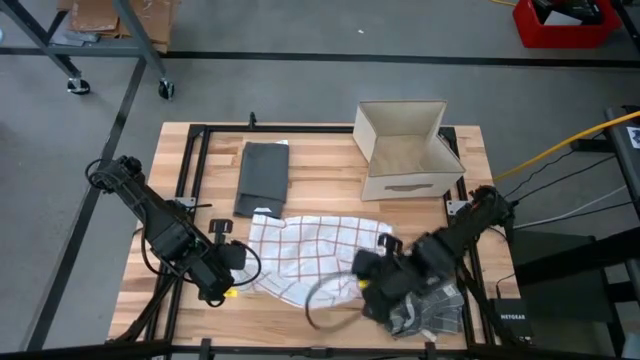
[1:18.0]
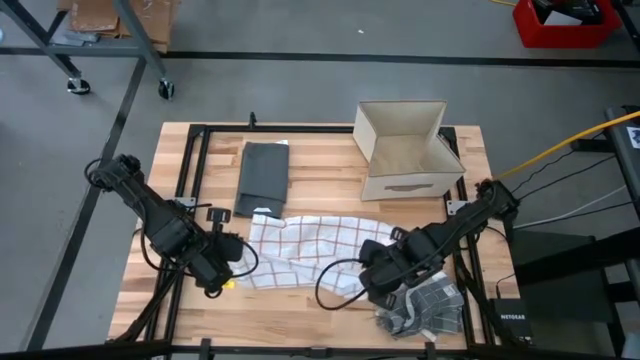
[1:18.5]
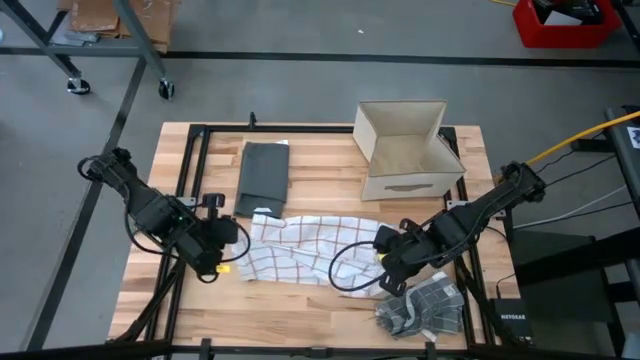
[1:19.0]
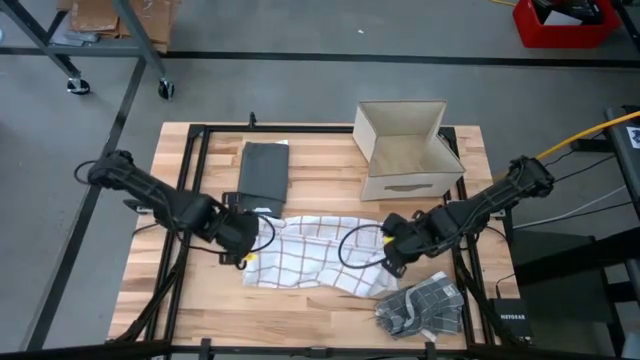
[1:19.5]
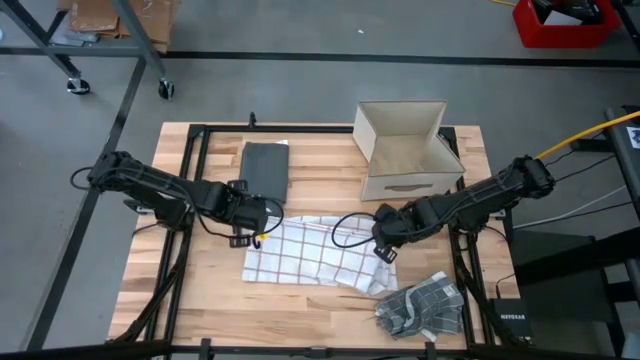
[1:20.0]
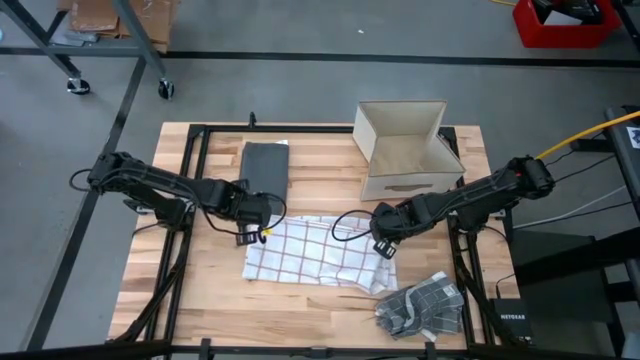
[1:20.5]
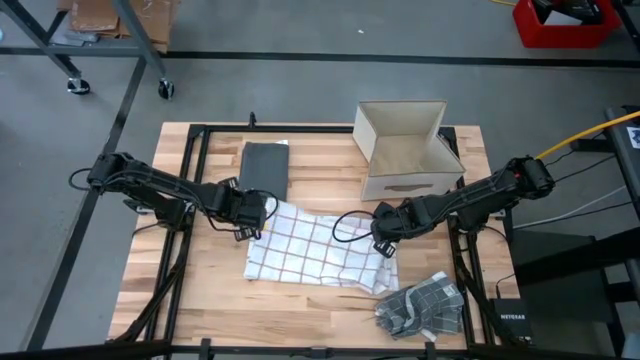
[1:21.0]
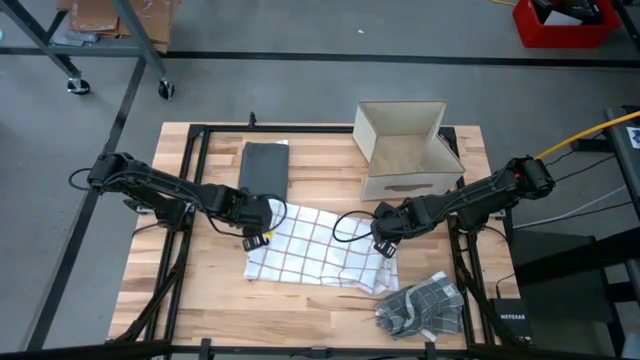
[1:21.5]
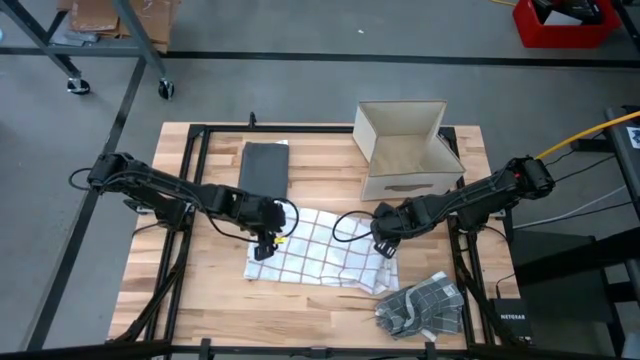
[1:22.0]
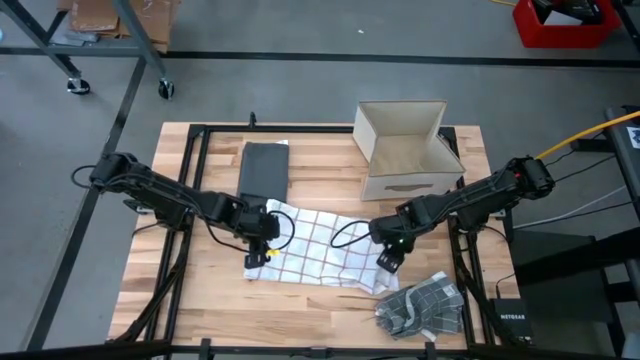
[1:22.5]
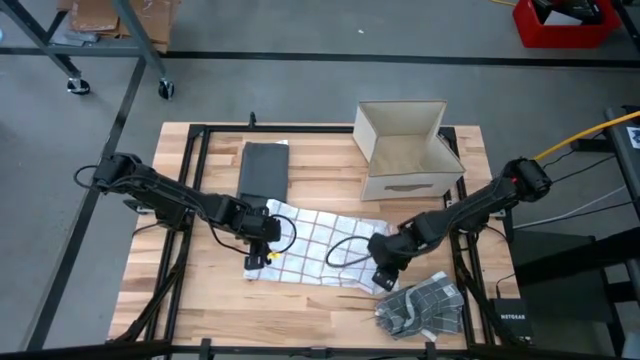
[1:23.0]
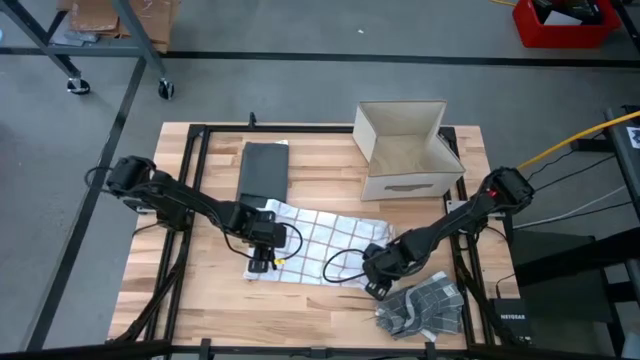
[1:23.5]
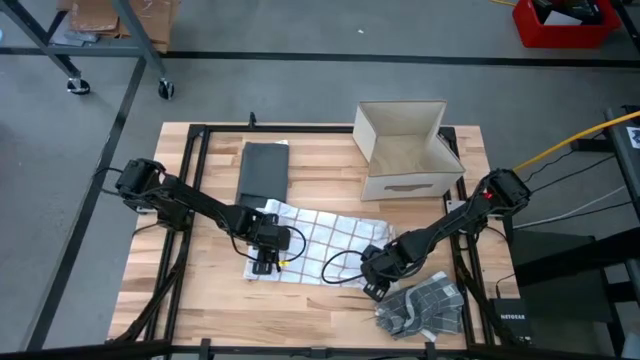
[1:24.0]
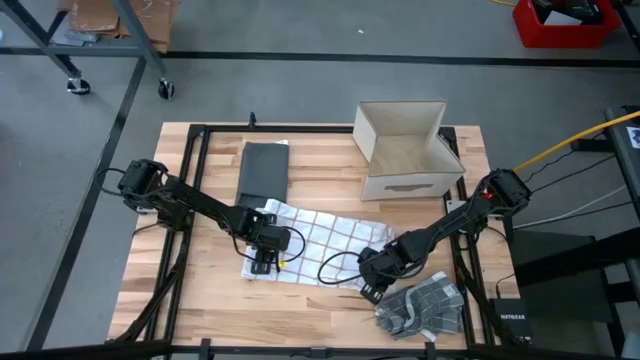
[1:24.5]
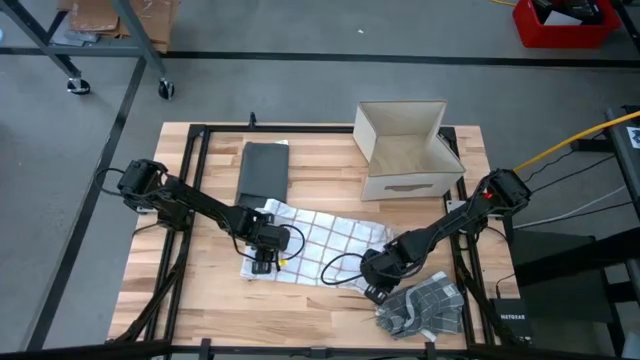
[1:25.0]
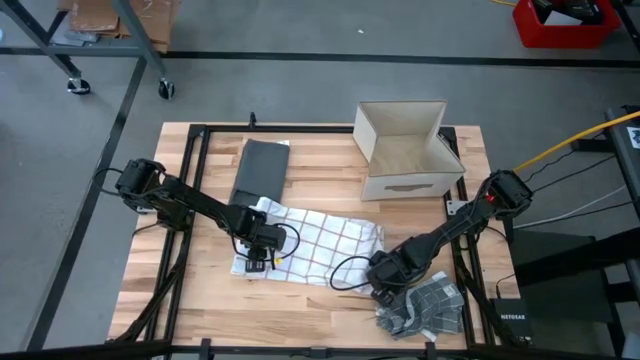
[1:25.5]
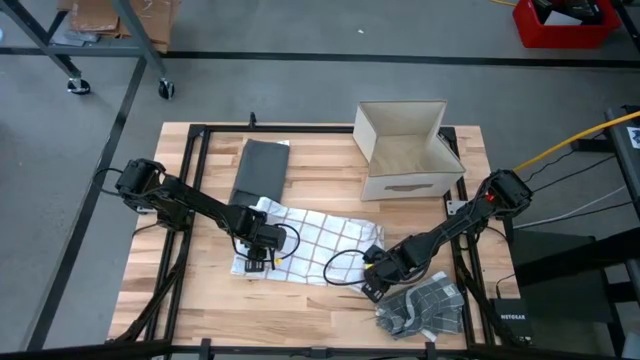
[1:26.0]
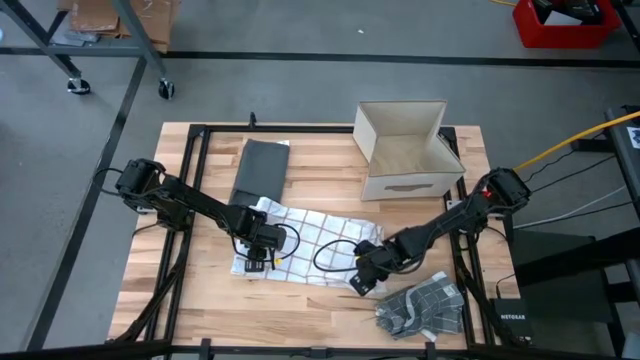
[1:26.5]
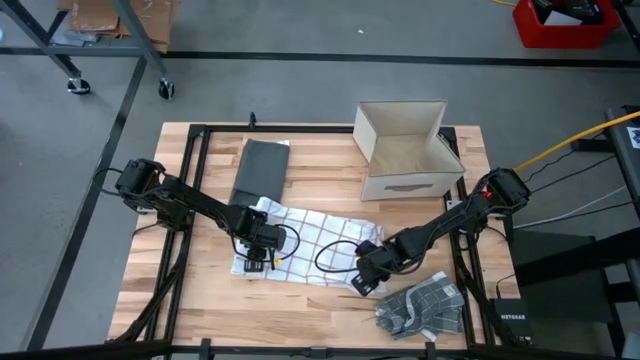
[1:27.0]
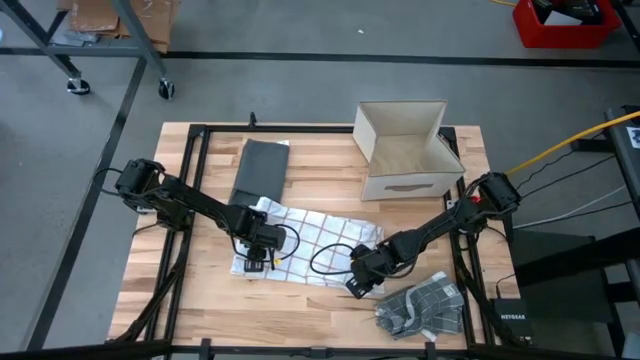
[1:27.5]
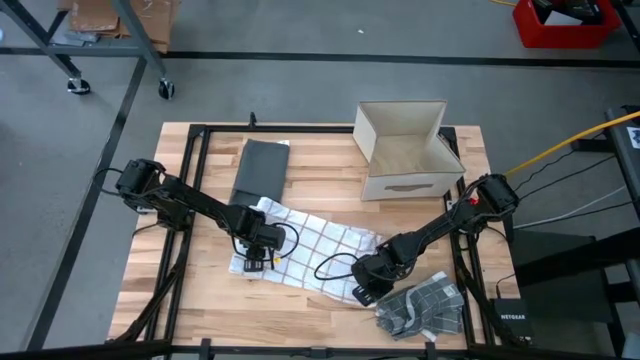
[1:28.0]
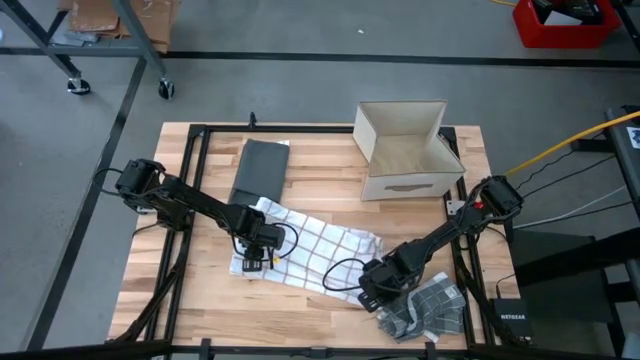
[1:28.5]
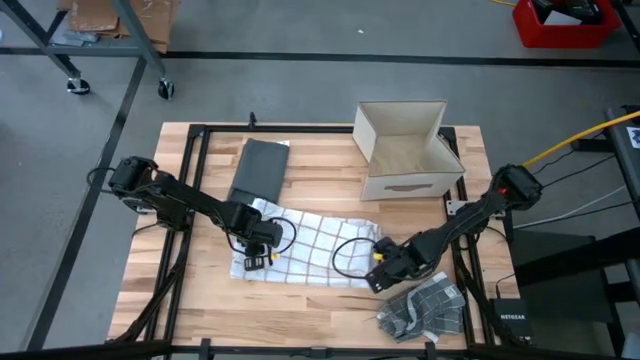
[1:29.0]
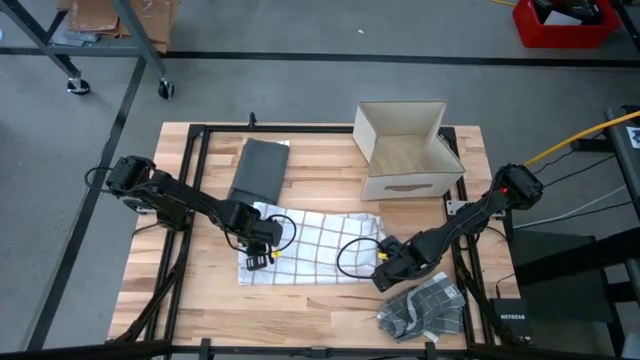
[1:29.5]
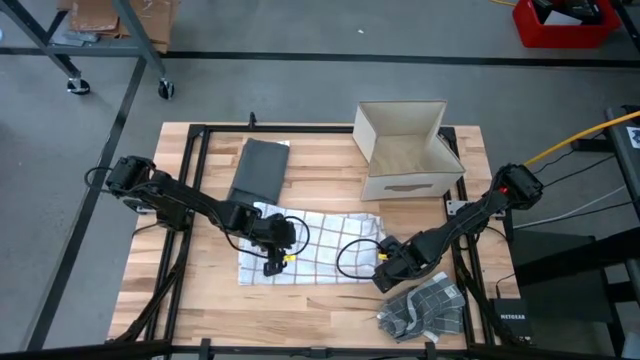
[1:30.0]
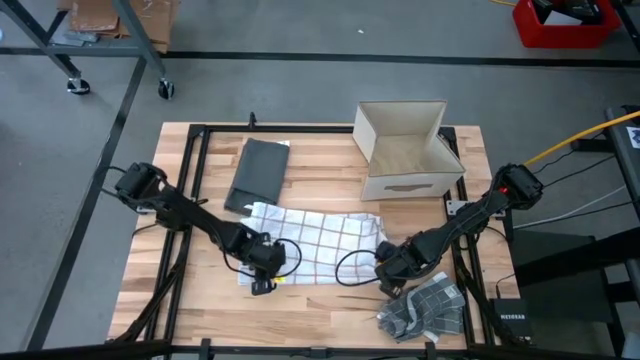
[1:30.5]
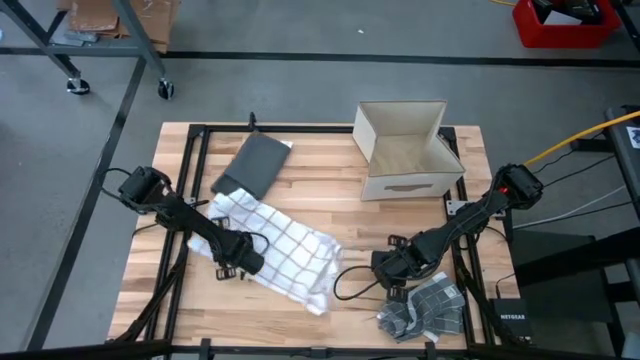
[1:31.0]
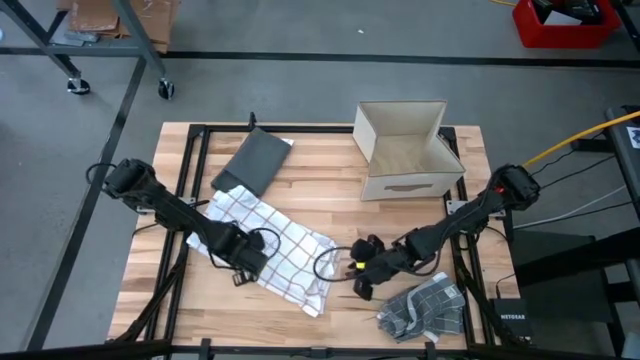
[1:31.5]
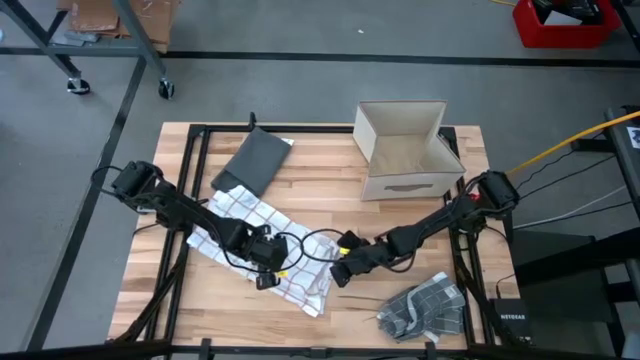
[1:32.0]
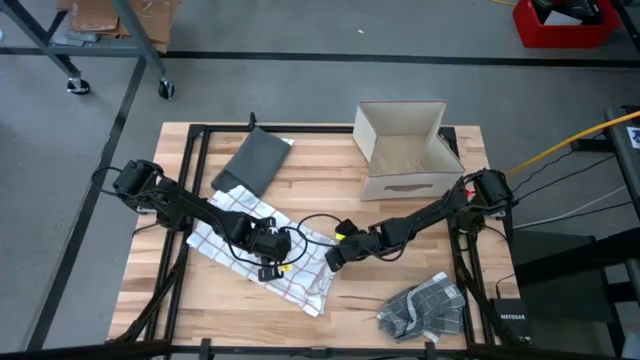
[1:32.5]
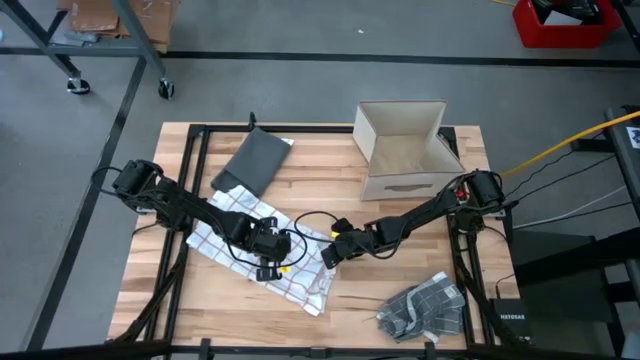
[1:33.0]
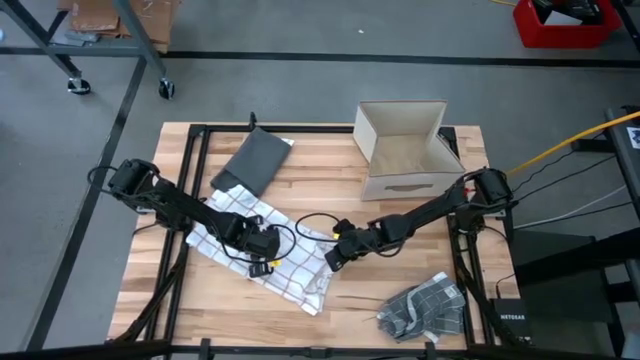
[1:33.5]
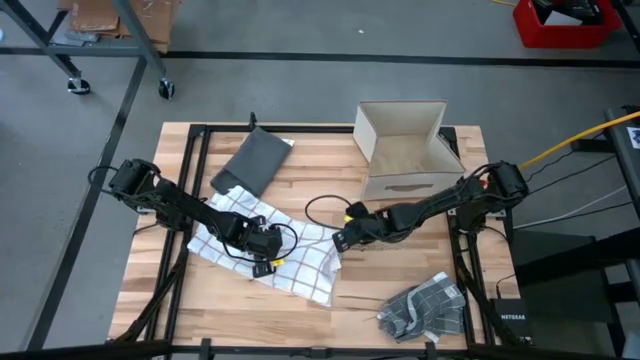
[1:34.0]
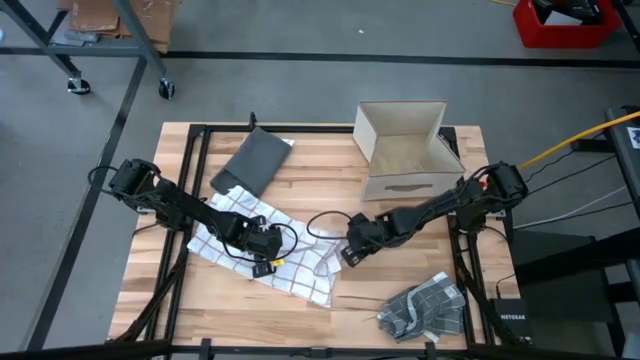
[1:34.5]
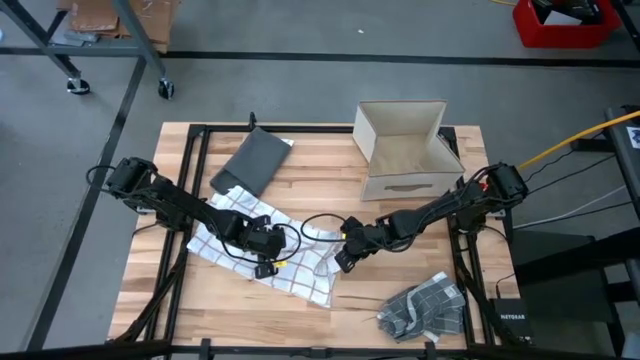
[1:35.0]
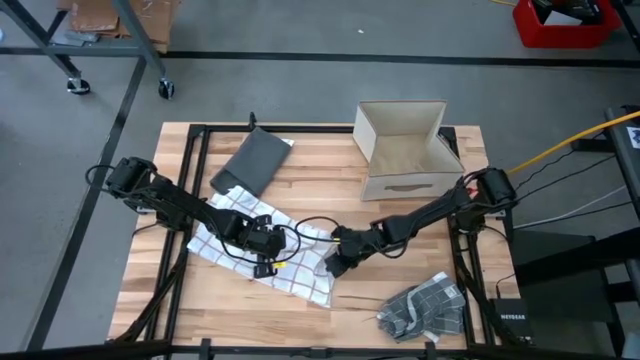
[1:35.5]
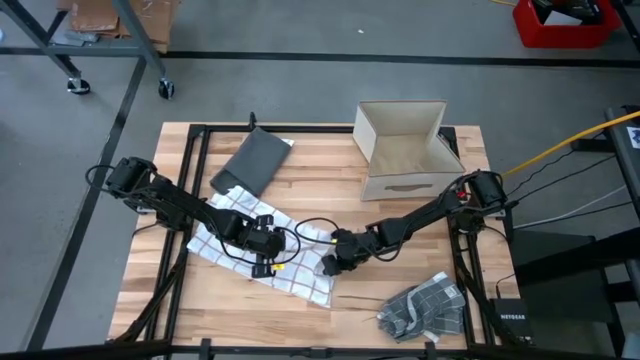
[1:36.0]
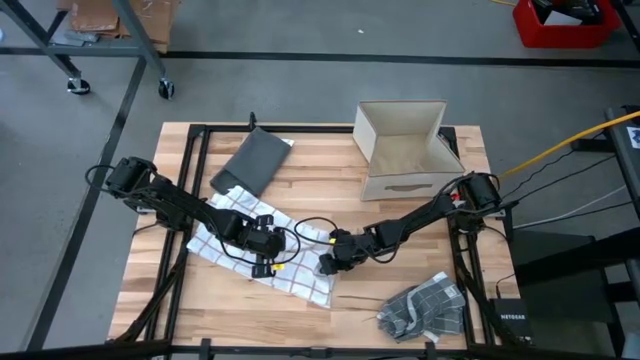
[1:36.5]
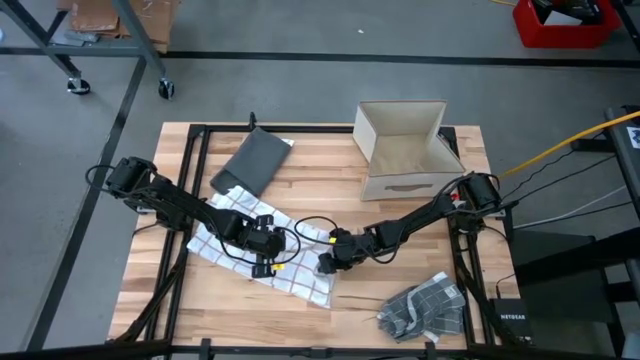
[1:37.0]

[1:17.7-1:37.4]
Task: Fold towel
Fold the white kitchen towel

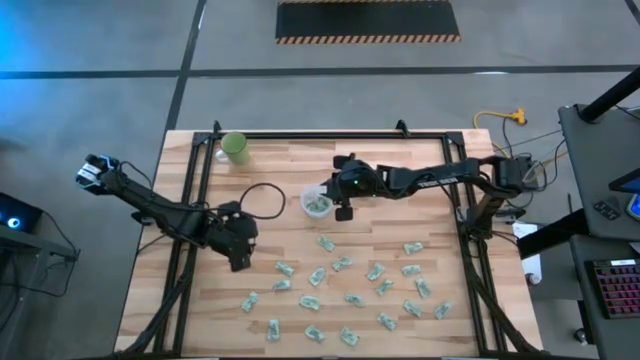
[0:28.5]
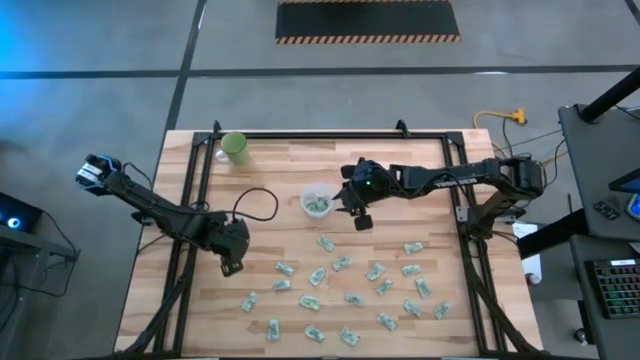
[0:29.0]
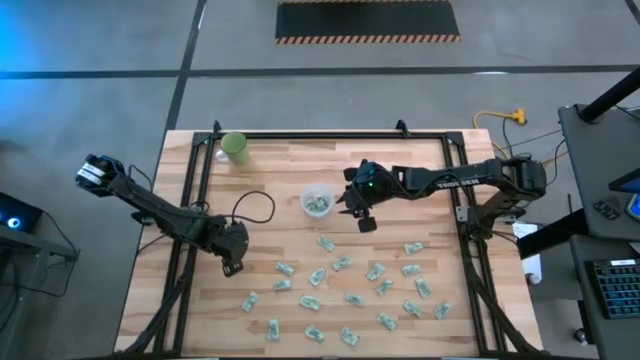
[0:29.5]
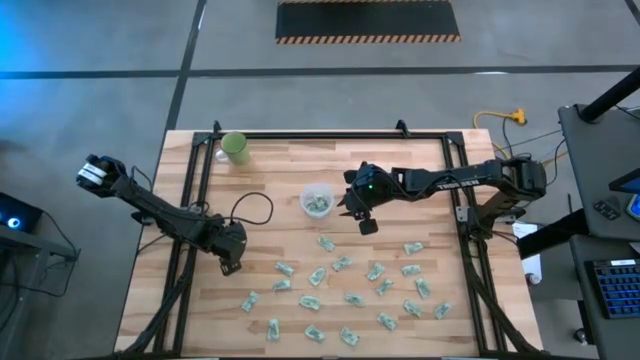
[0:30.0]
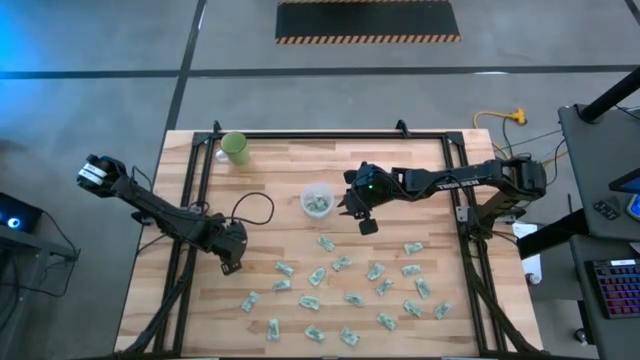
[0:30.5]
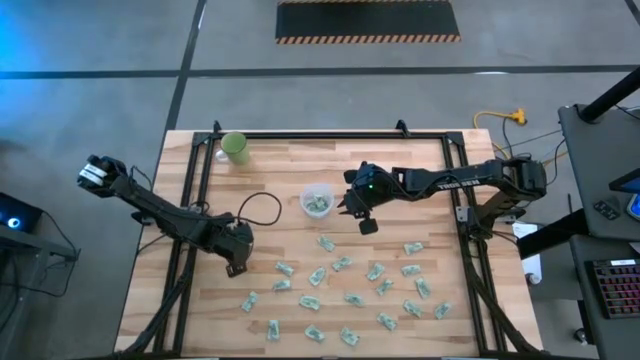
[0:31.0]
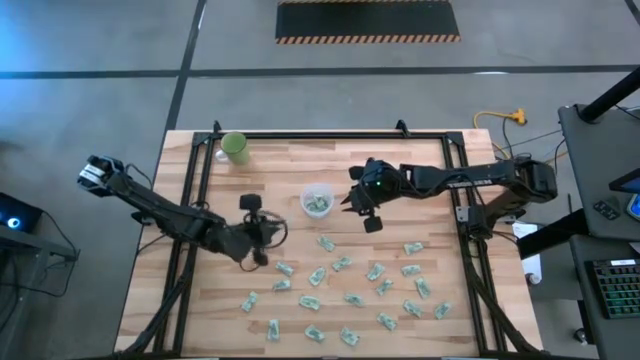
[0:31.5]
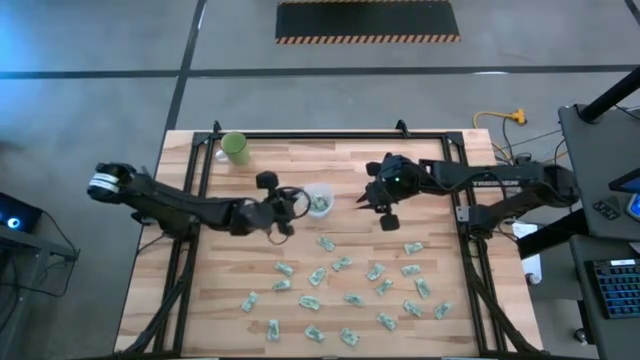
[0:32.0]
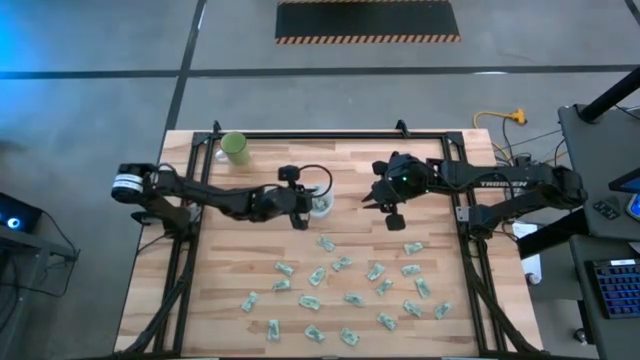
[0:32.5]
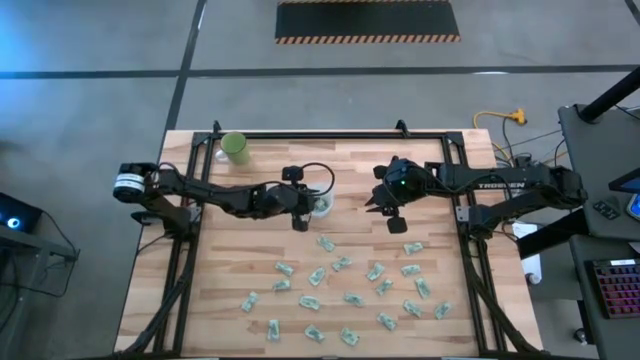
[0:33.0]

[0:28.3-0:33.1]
Task: Pick and place Stevia / Truvia into bins
Put the green stevia packet into the transparent container
